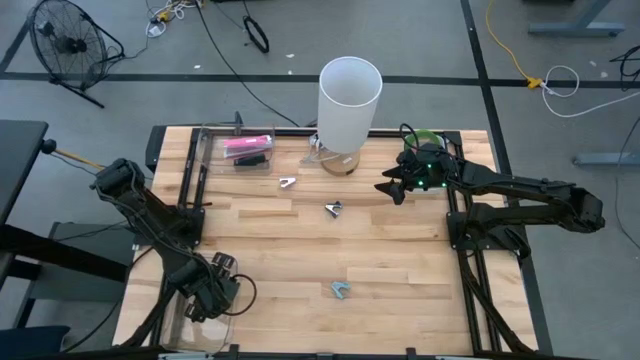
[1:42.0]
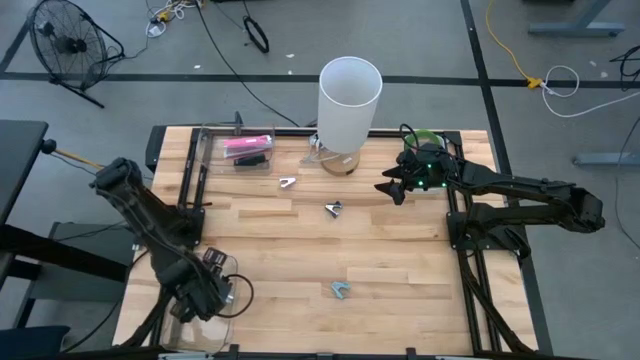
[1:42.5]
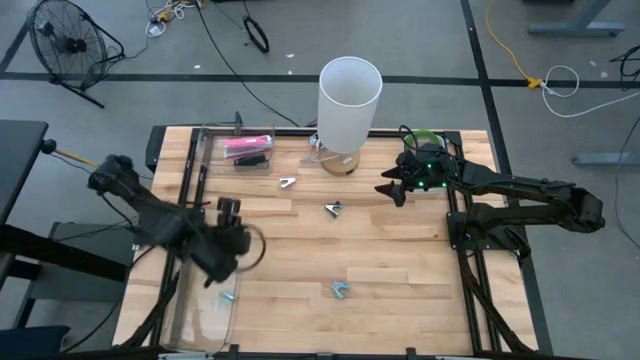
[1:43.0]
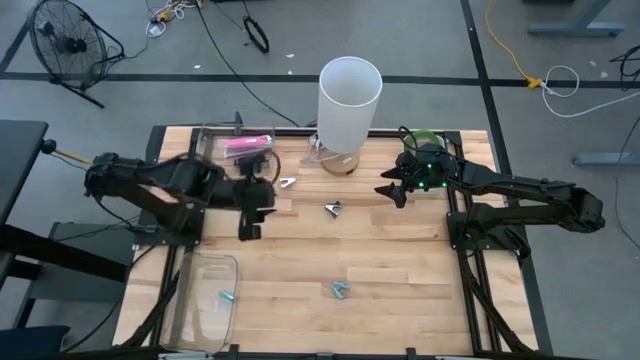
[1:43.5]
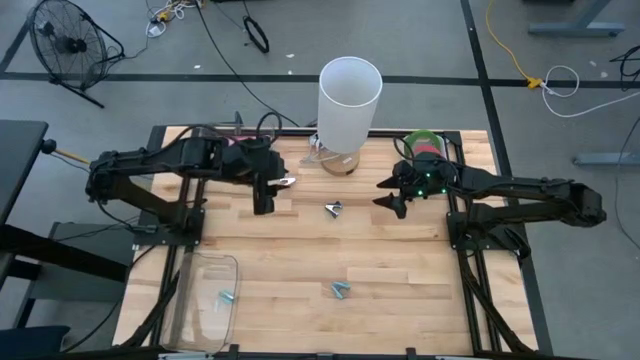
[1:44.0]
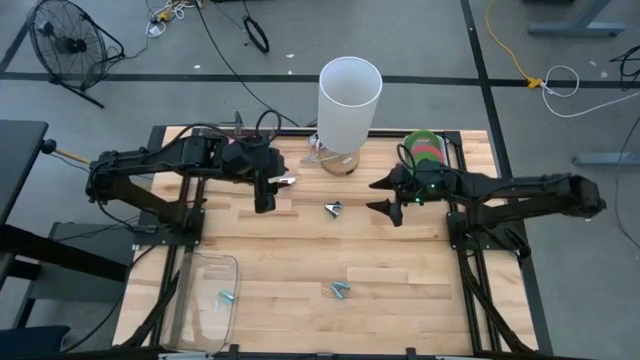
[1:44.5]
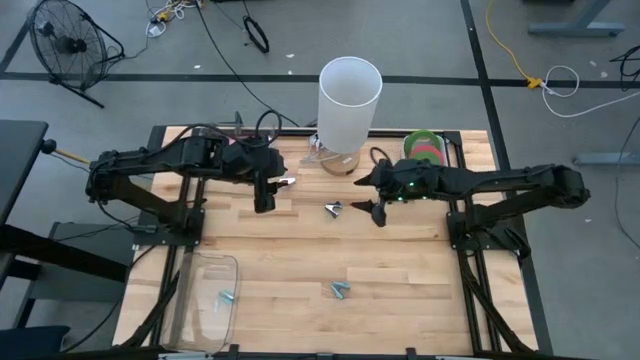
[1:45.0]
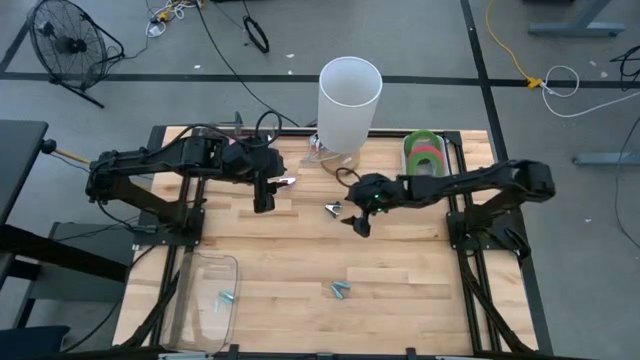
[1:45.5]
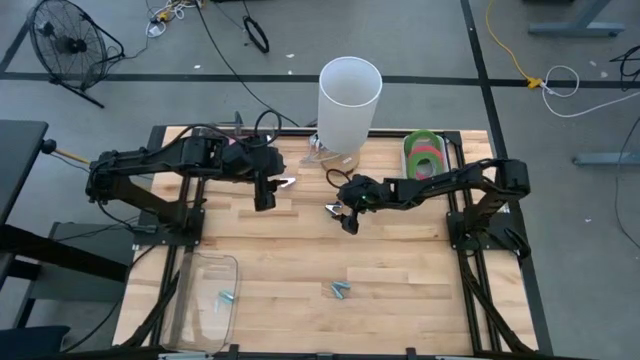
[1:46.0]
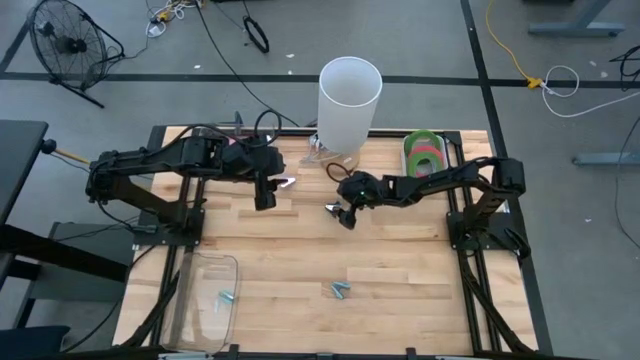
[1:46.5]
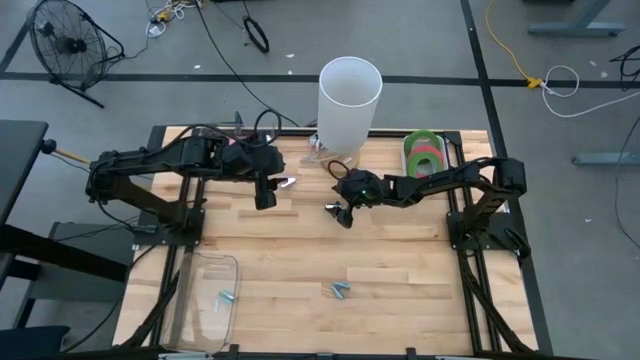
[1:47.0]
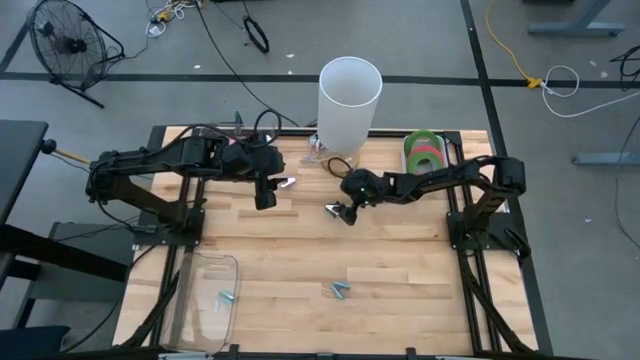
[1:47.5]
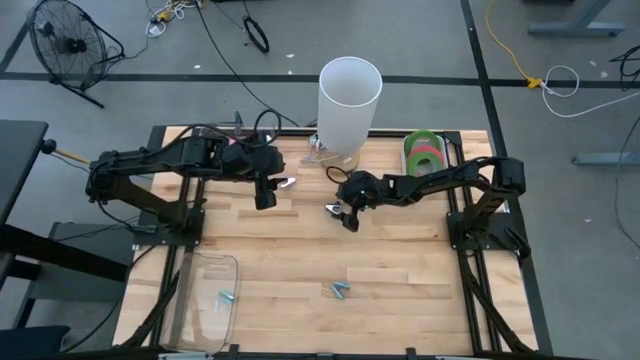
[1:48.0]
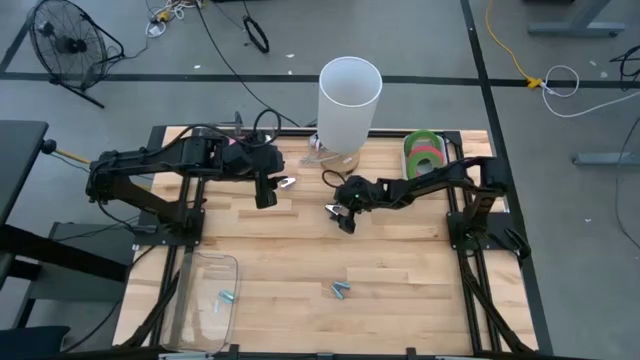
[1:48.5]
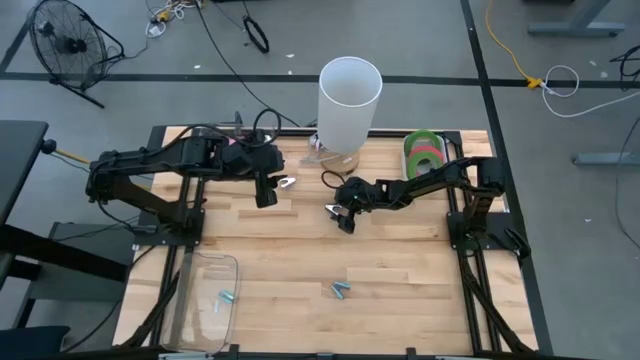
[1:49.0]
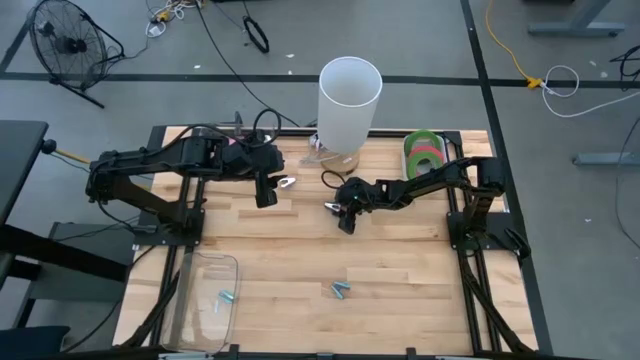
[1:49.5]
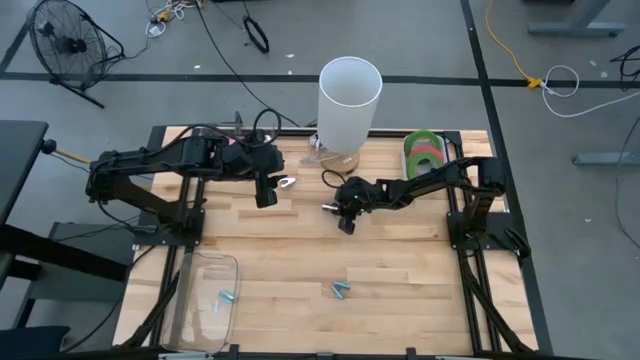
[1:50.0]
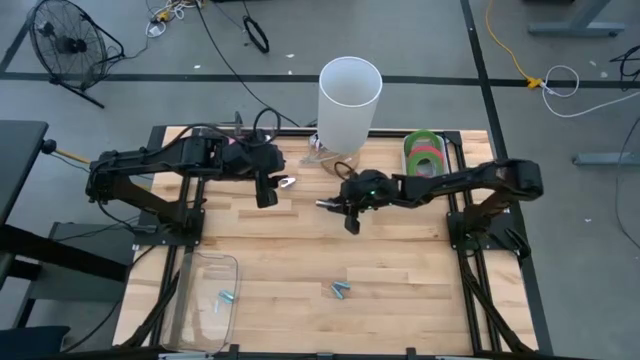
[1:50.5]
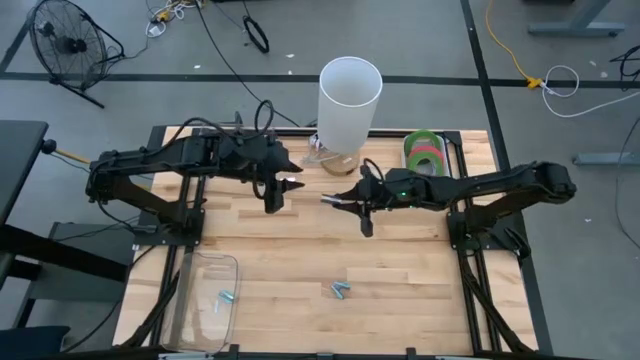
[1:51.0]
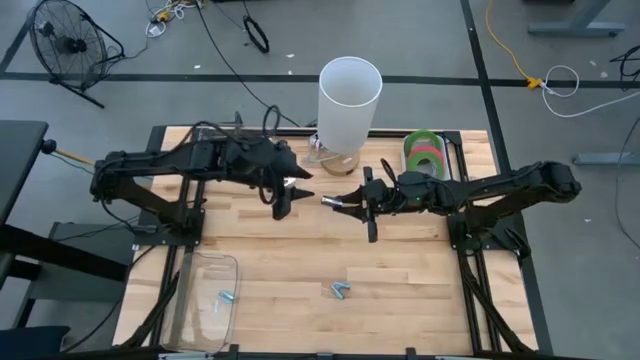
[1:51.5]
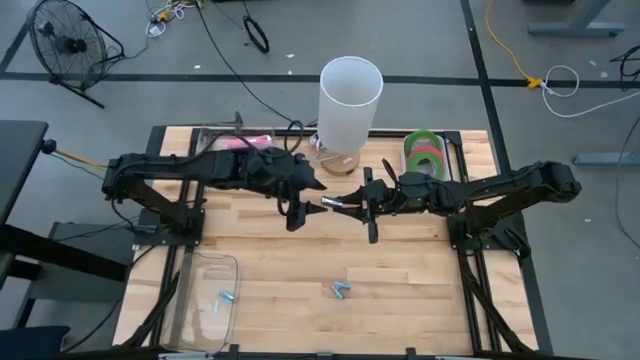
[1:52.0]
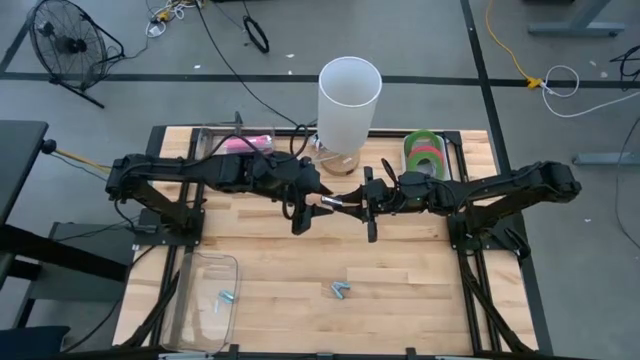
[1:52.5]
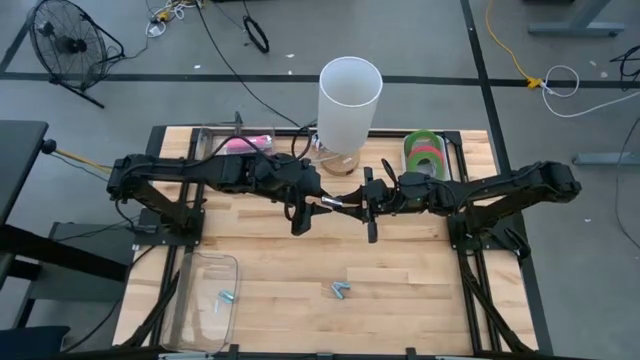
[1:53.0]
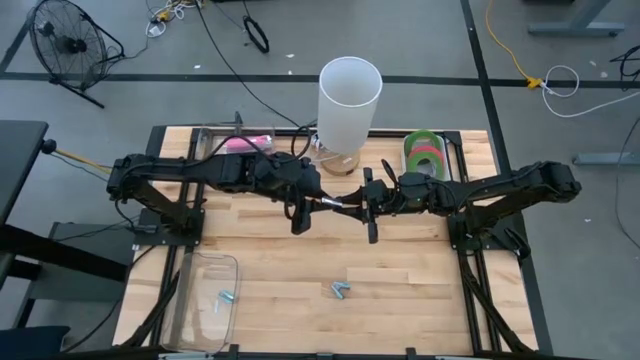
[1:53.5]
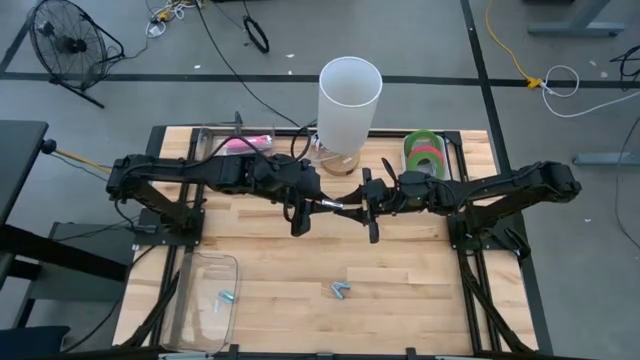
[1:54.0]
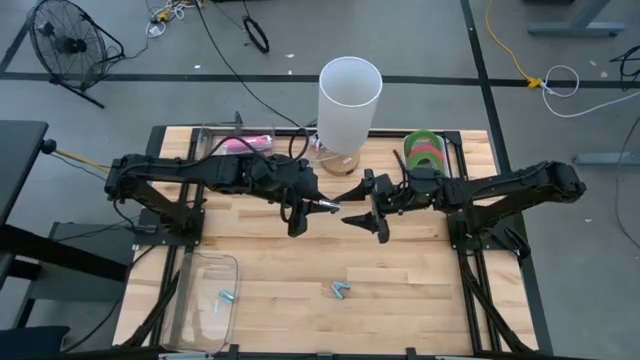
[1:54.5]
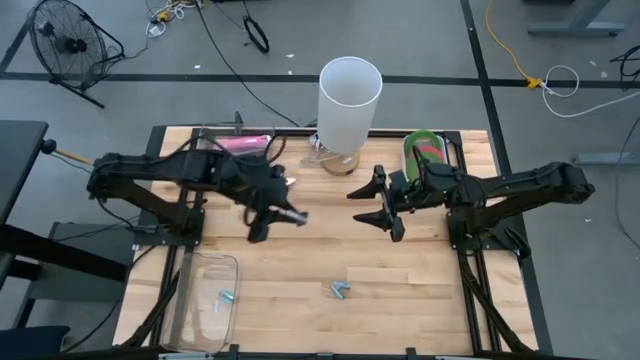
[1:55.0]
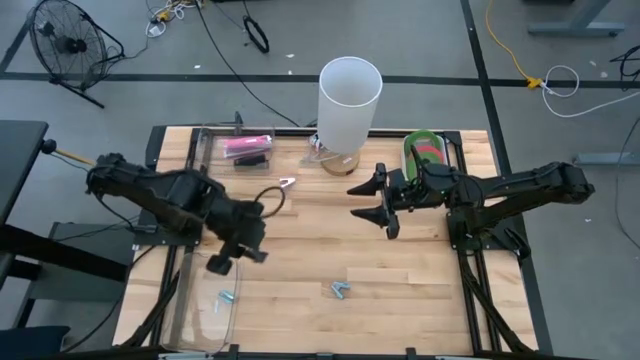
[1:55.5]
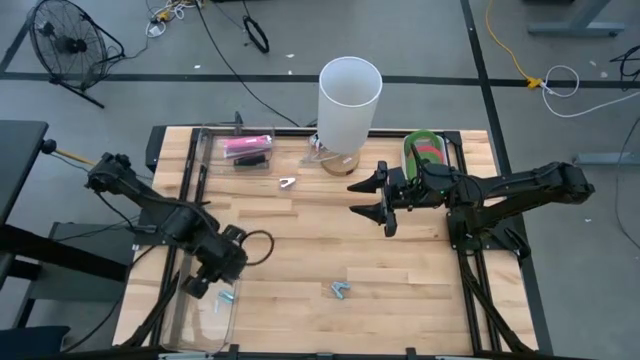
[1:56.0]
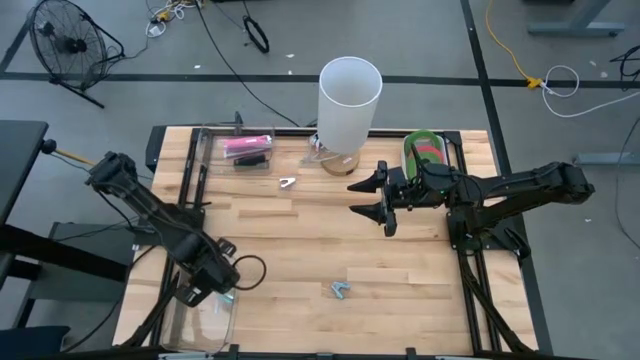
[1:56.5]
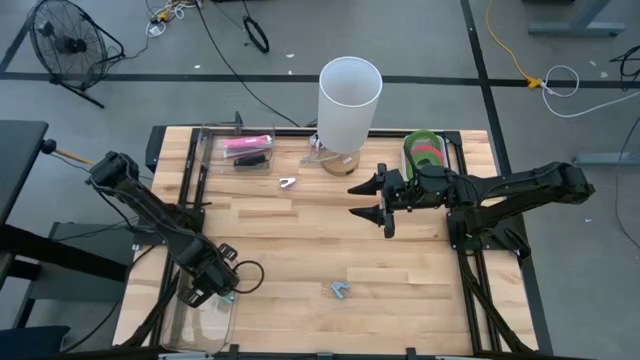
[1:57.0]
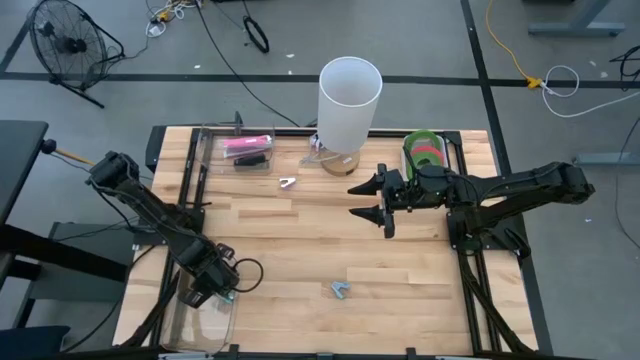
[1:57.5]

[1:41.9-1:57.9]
Task: Pick and place Stapler, Stapler remover, tape
Put the dark gray staple remover into the bottom transparent bin
